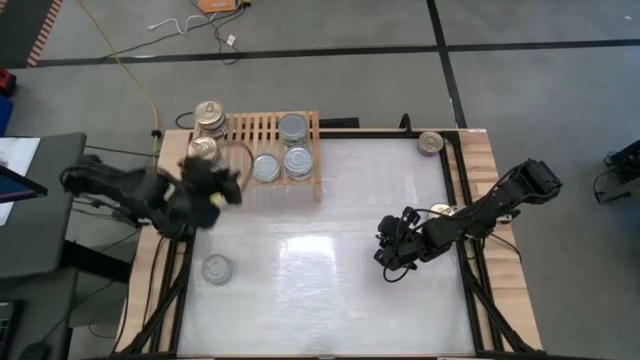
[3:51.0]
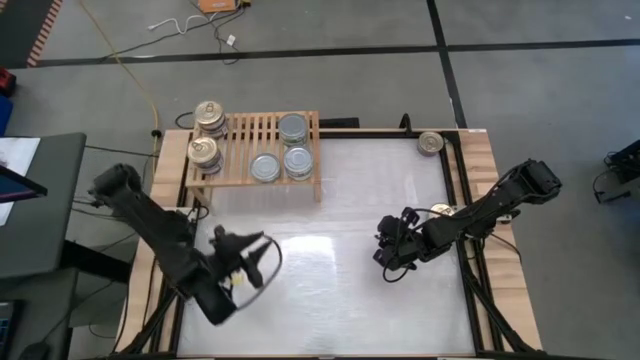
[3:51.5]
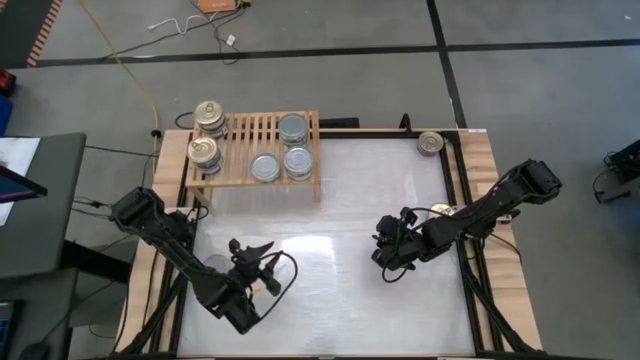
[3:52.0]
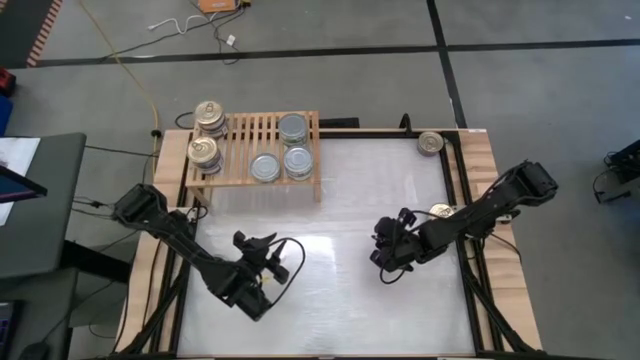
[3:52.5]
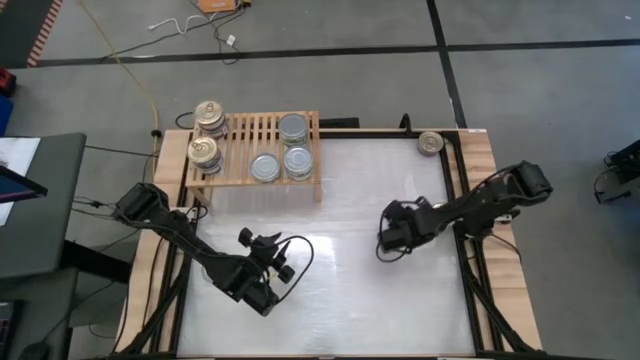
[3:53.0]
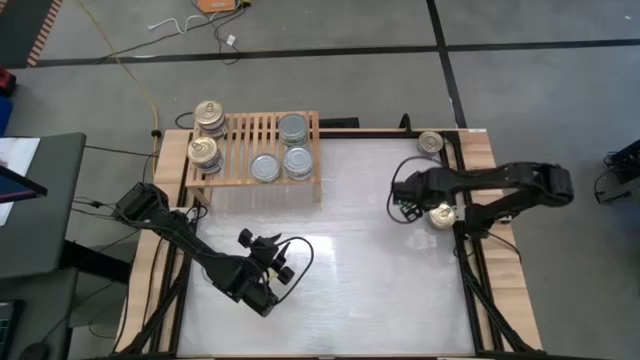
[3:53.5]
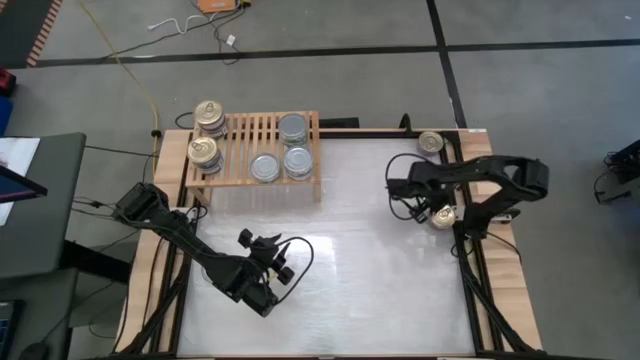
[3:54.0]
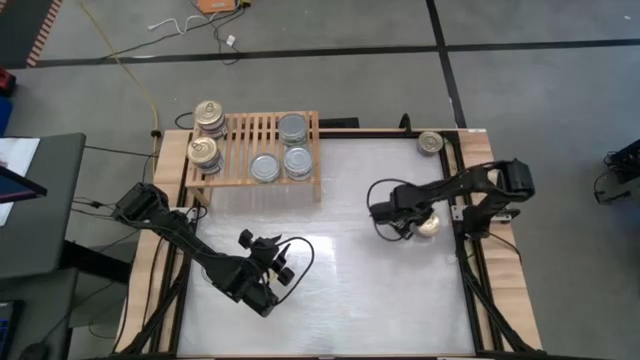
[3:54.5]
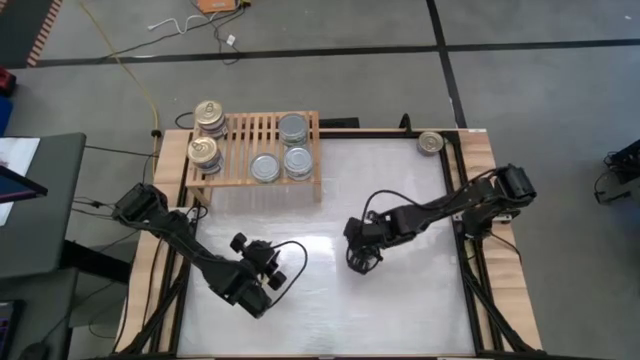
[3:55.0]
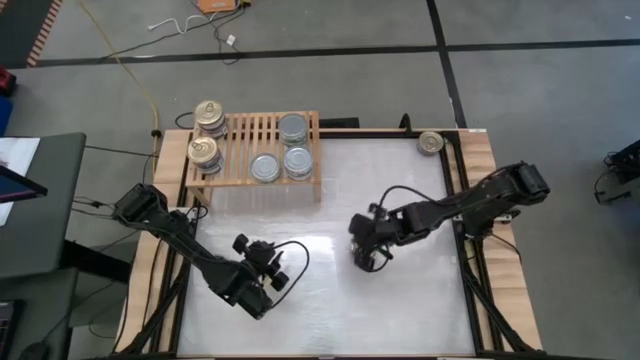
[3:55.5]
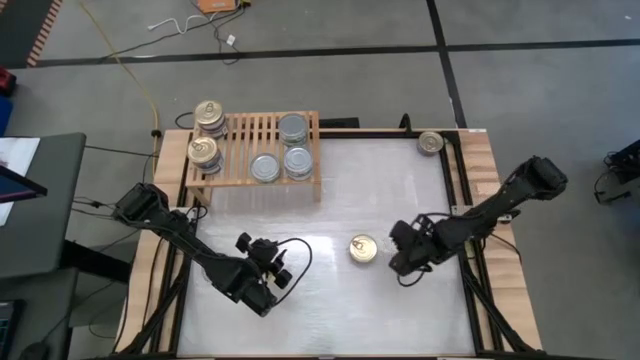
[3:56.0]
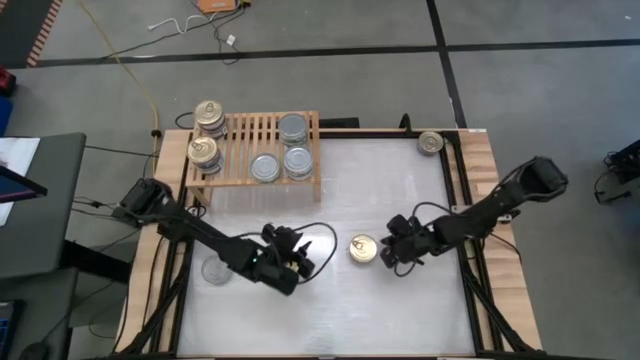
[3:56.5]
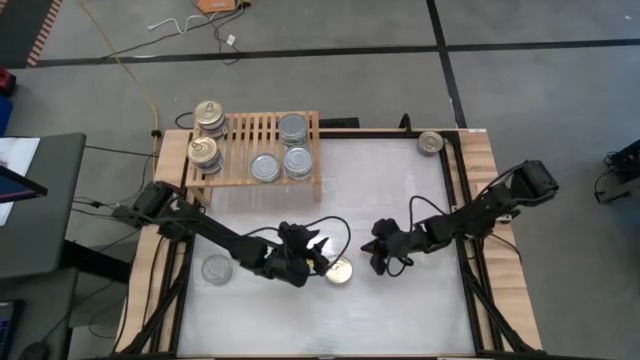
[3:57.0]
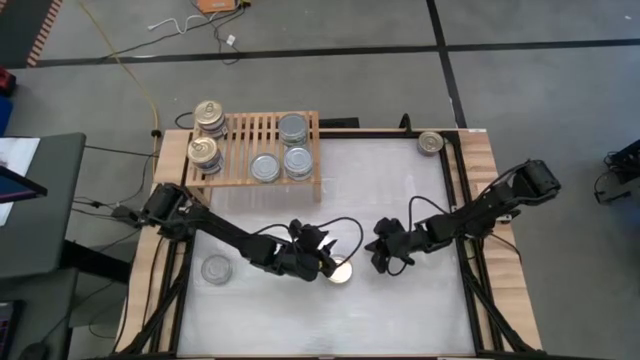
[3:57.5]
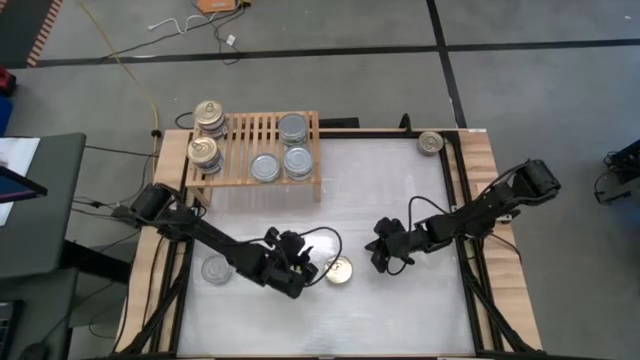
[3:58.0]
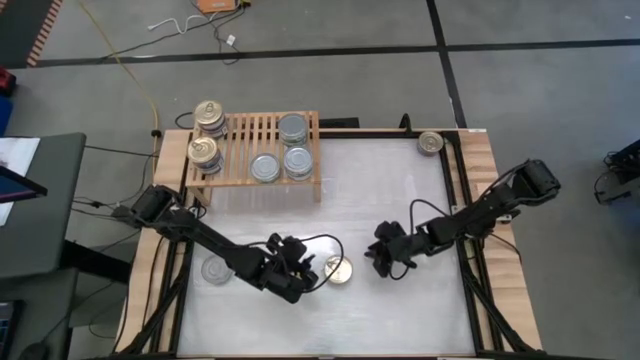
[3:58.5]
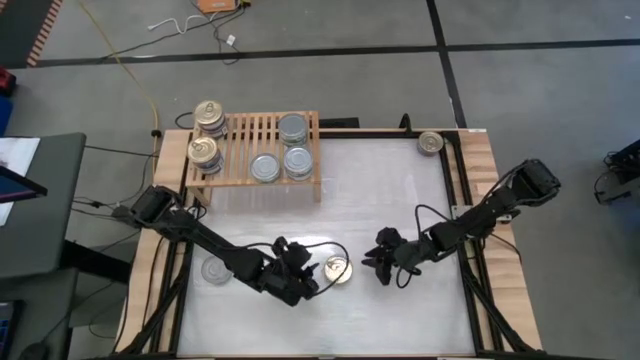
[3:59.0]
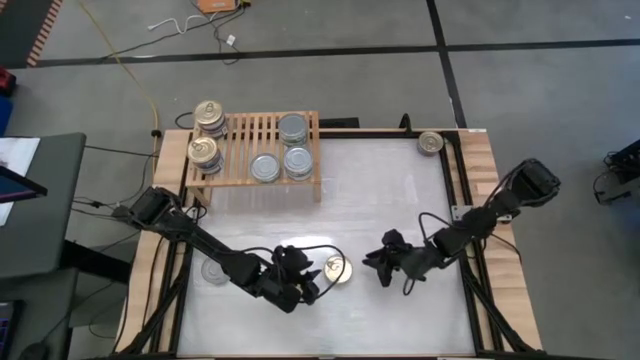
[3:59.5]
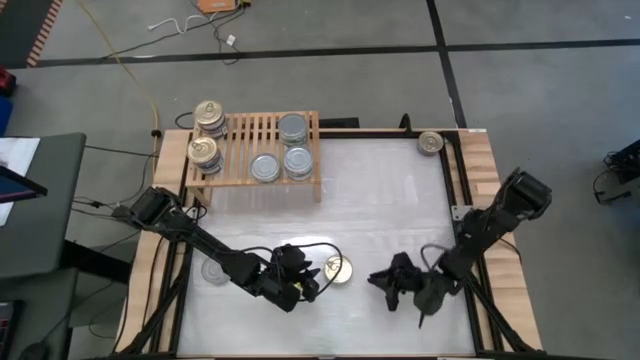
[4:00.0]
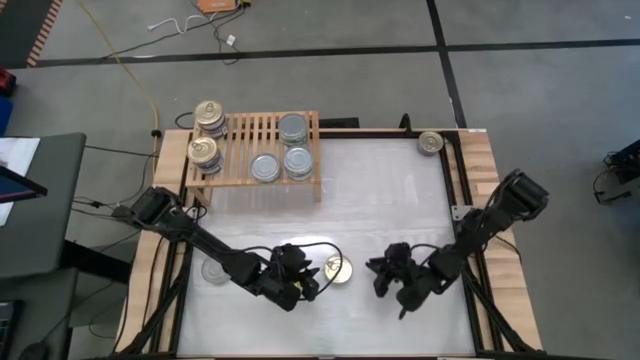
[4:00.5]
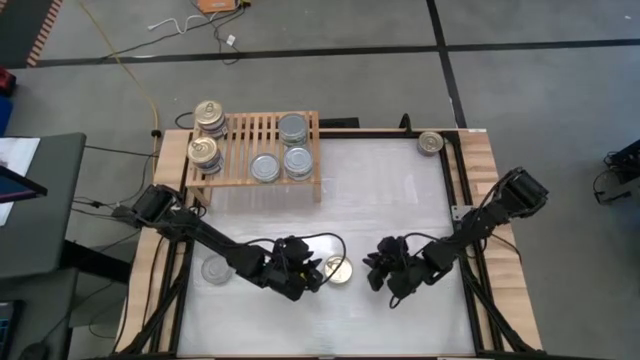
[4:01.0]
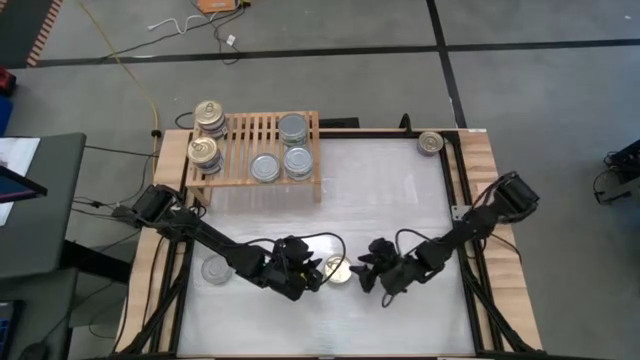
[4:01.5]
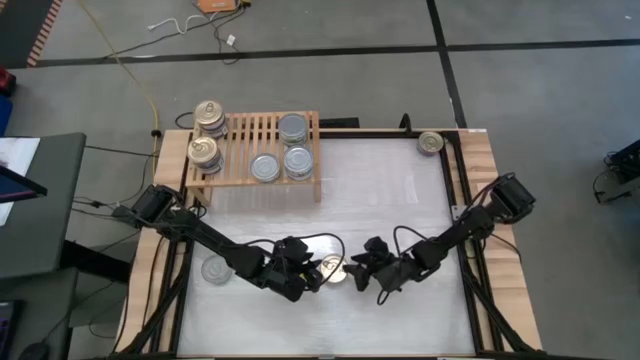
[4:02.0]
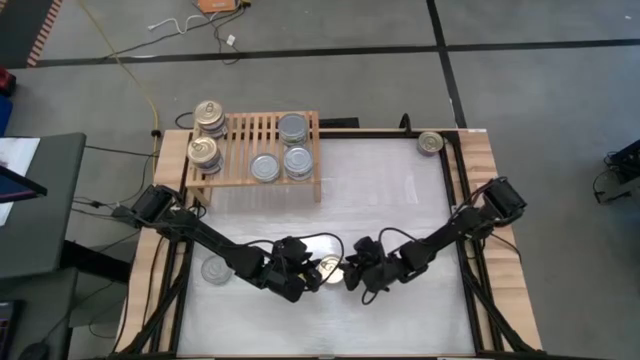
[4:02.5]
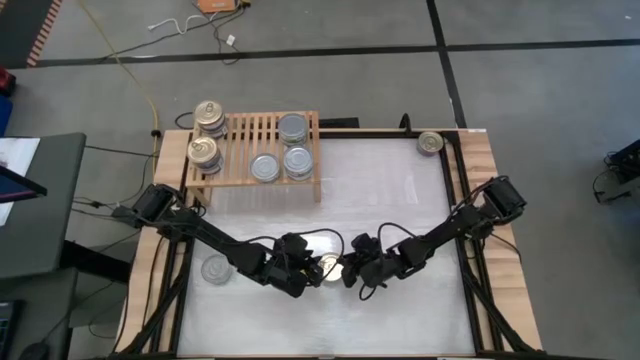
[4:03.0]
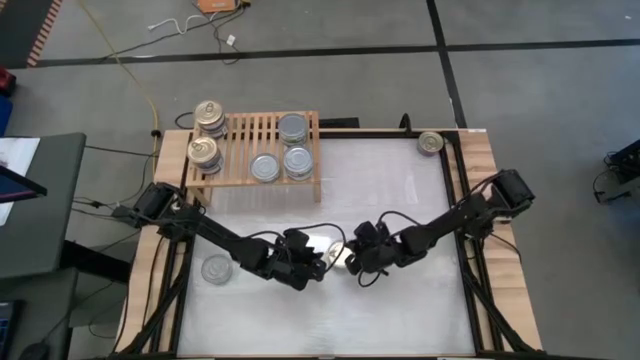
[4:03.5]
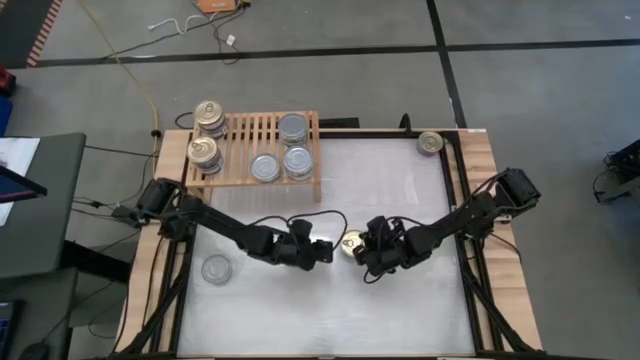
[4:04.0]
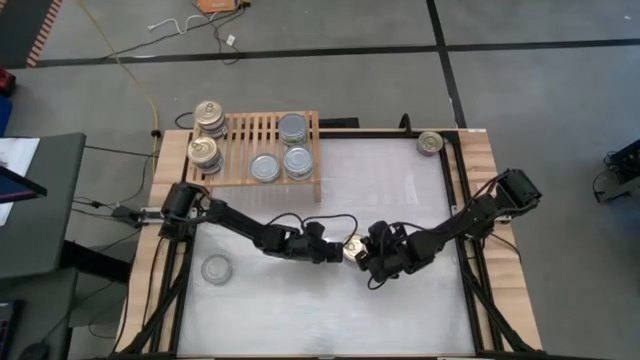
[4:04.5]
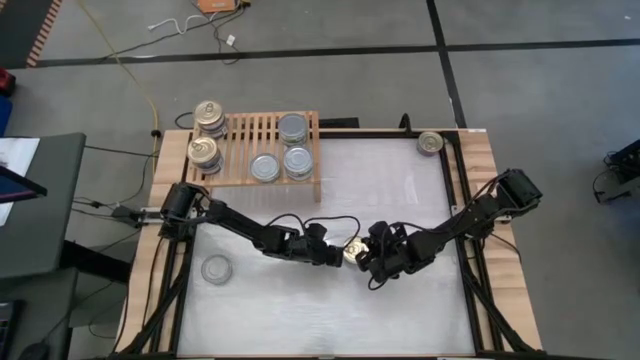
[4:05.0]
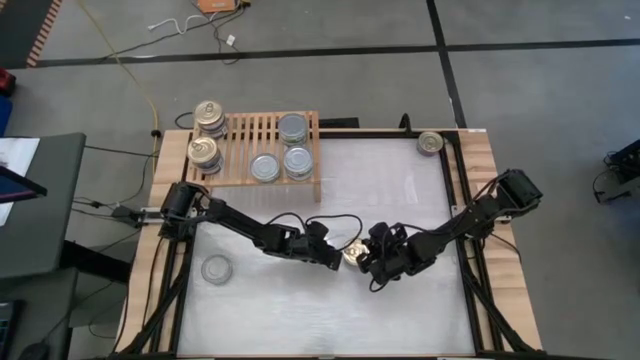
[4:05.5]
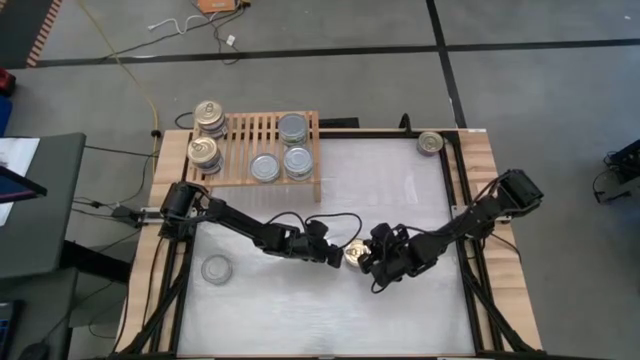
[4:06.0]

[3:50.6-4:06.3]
Task: Stack canned seafood by type on shelf
Put the blue tuna on the shelf

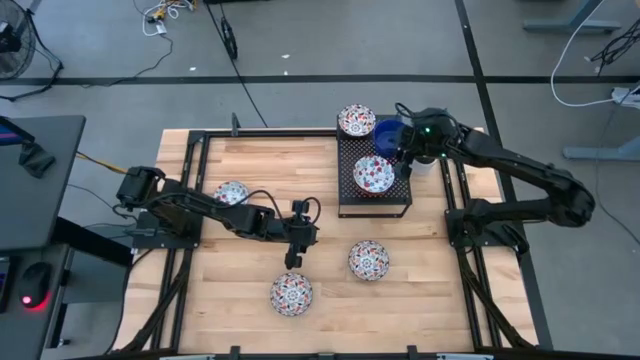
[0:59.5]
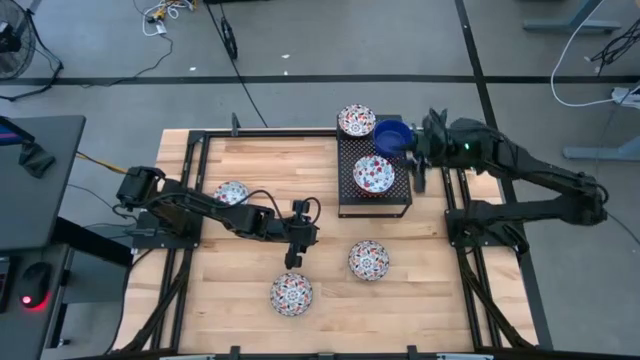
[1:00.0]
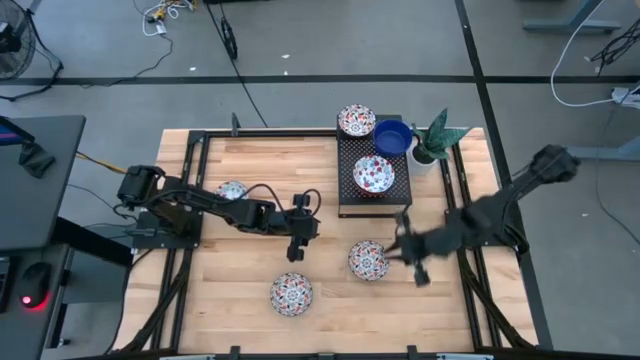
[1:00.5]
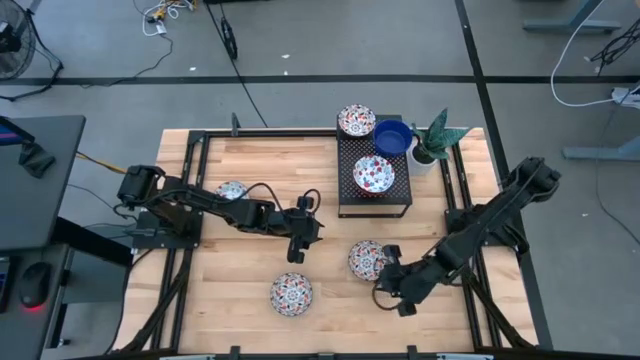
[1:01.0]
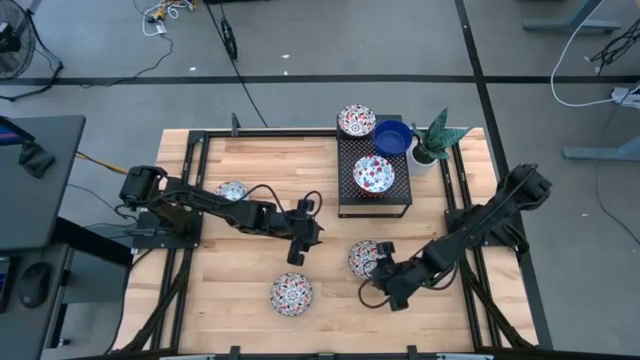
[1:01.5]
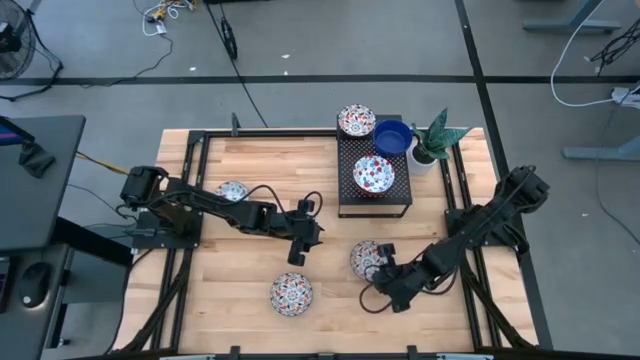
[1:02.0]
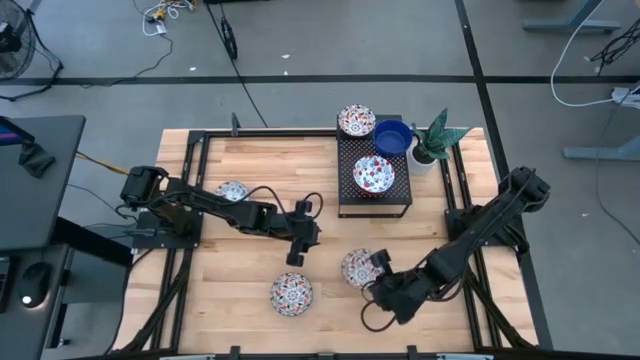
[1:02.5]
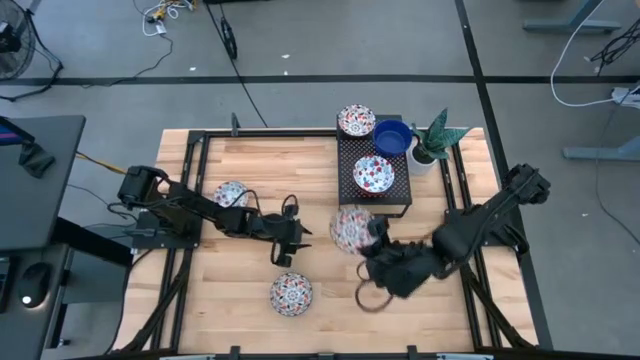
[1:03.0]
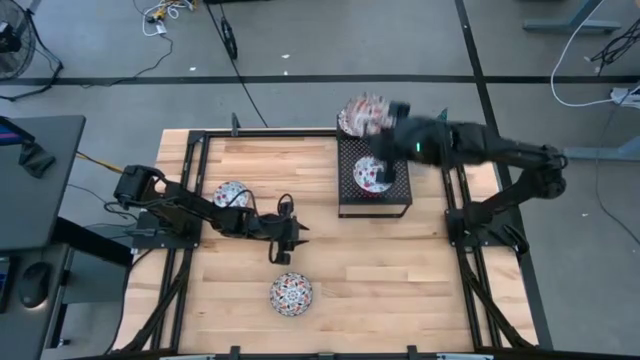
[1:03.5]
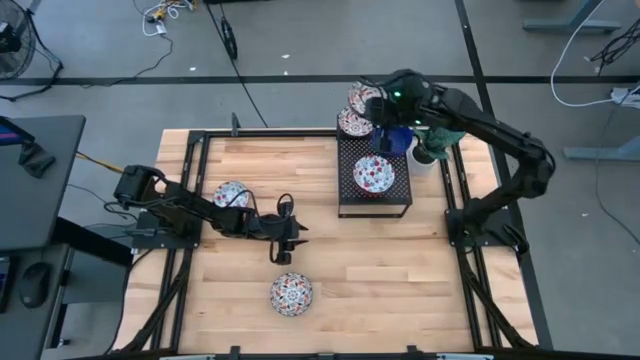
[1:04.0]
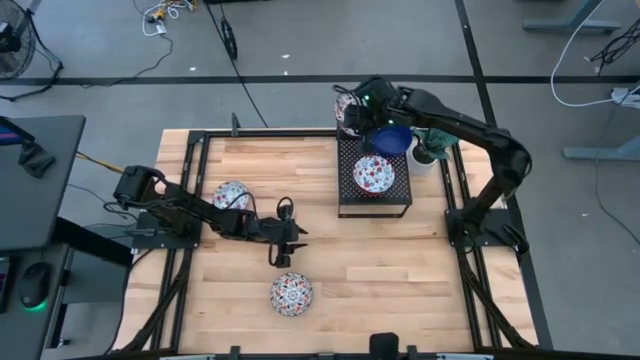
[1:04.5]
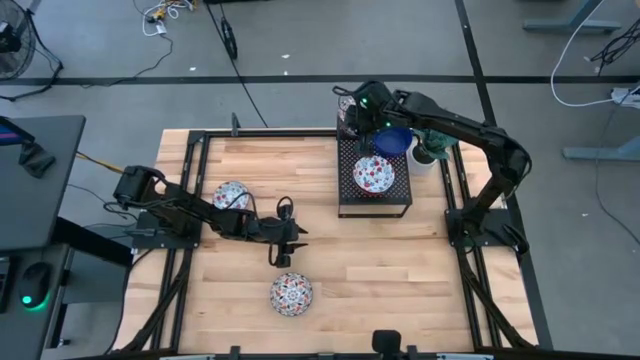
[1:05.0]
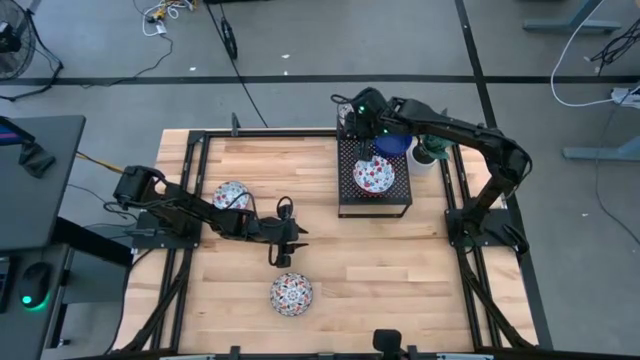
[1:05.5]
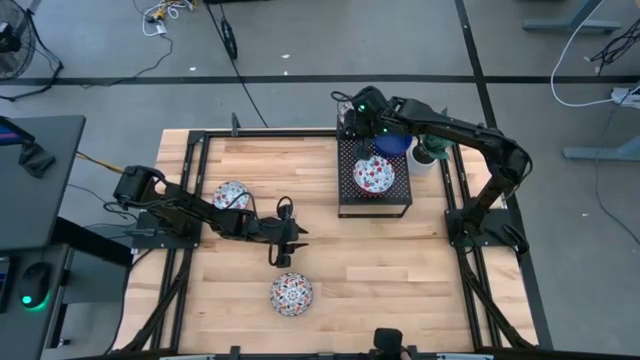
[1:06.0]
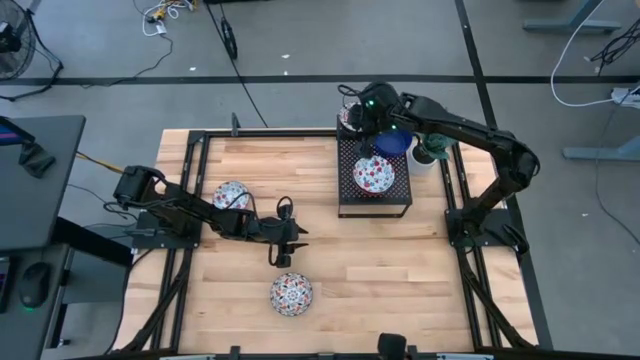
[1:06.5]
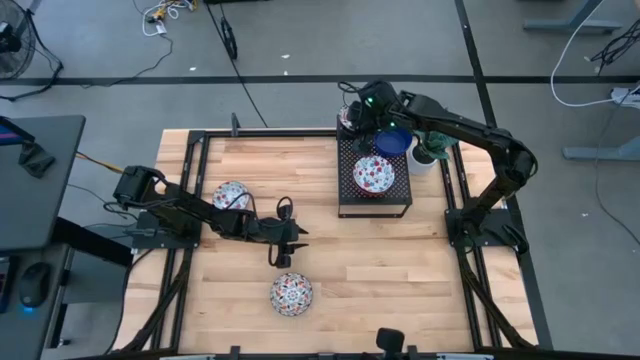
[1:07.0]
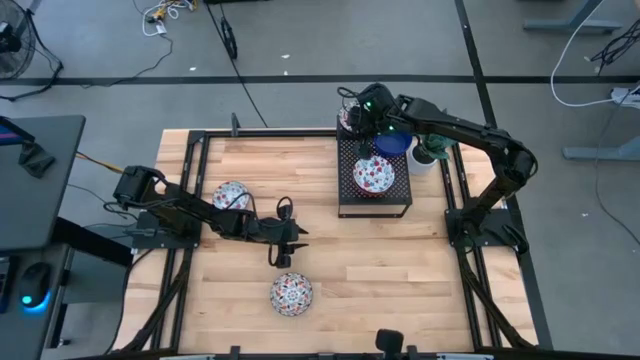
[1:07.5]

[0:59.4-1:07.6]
Task: Pick & Place Mini bowls
Stack the right orange patterned bowl on top of the other orange patterned bowl on the shelf
